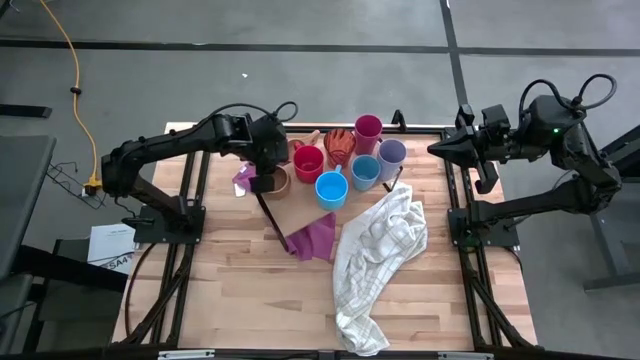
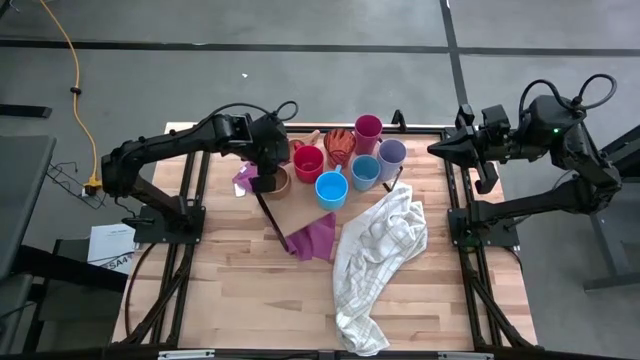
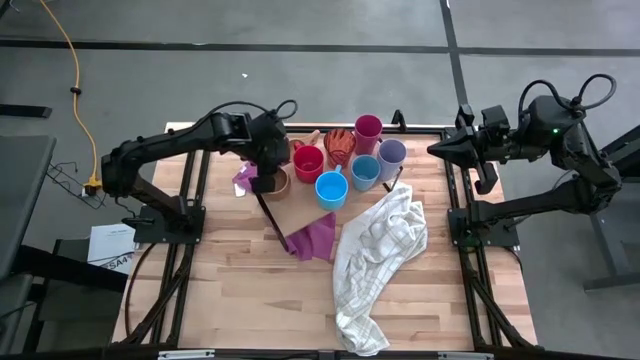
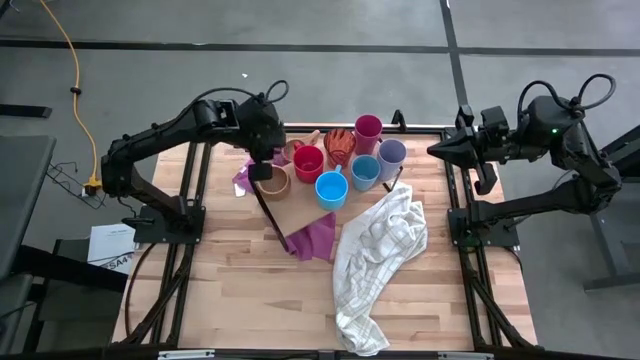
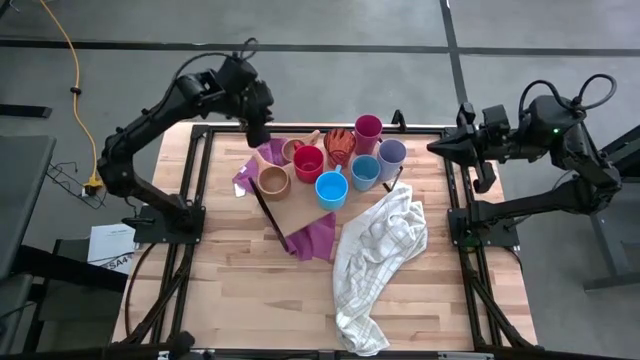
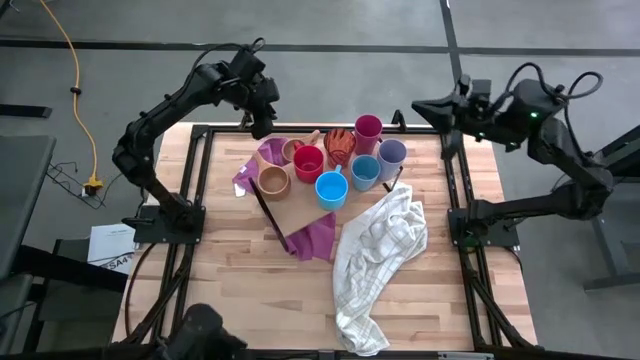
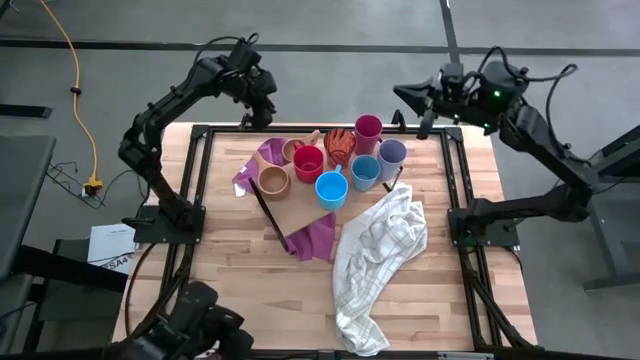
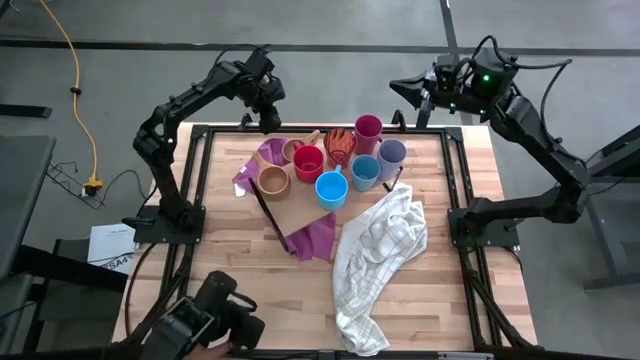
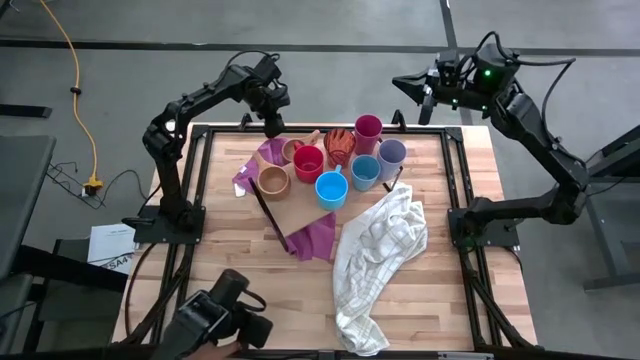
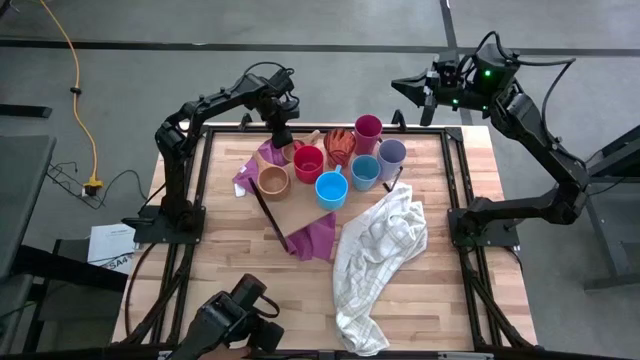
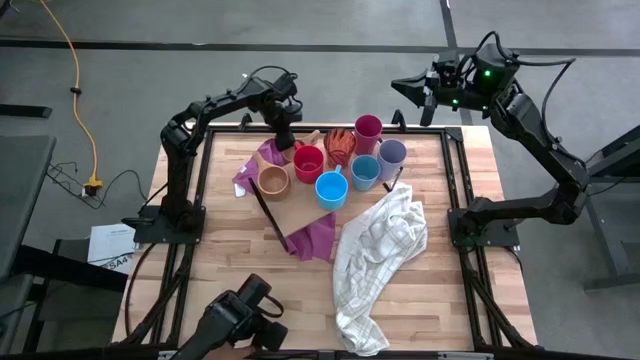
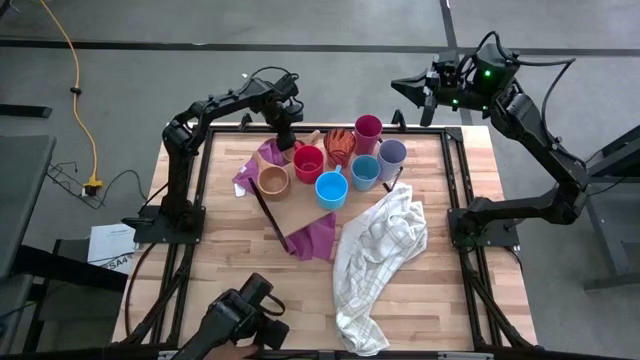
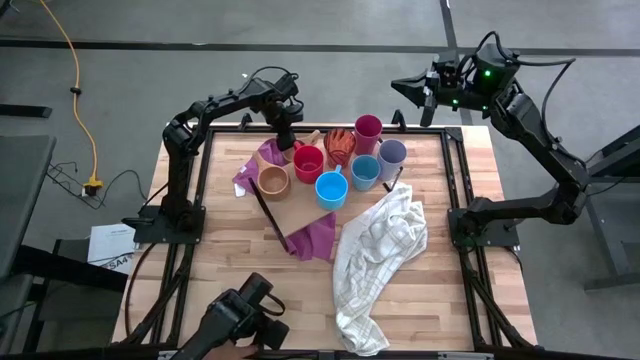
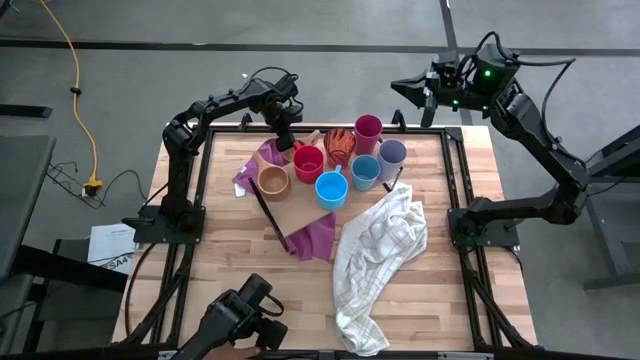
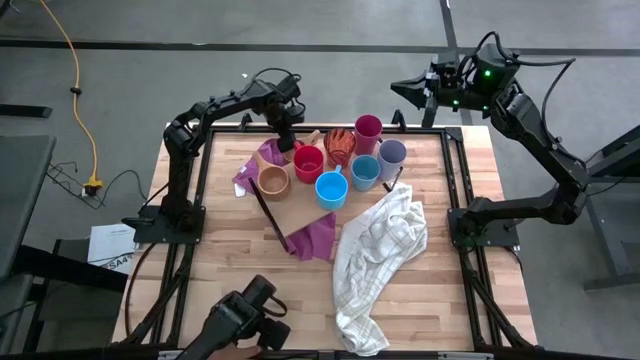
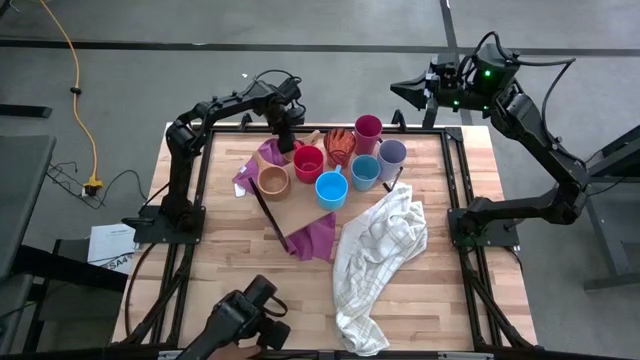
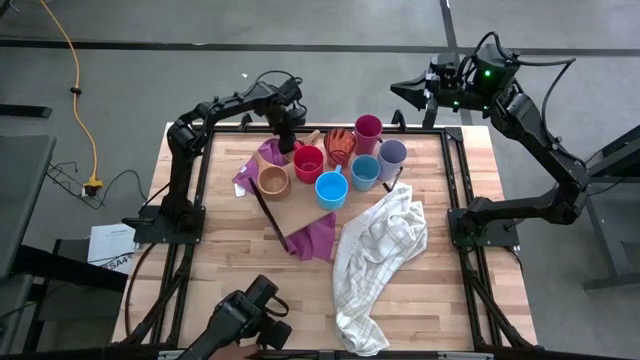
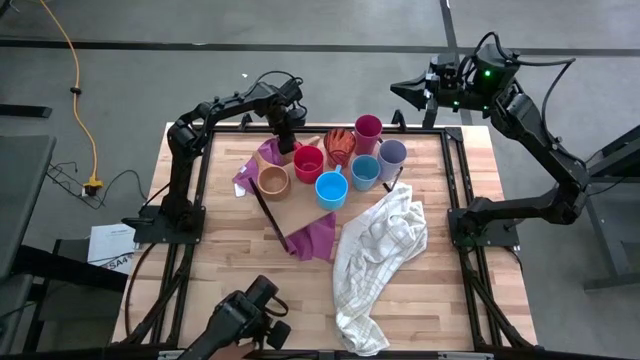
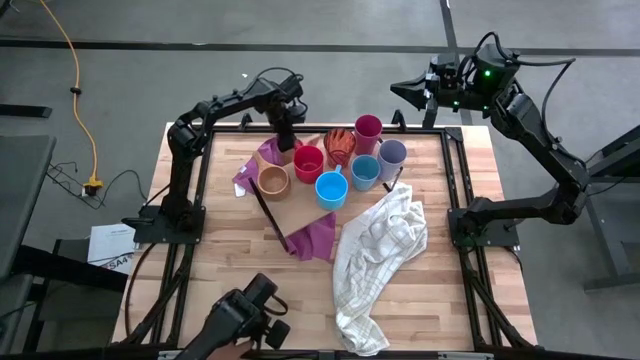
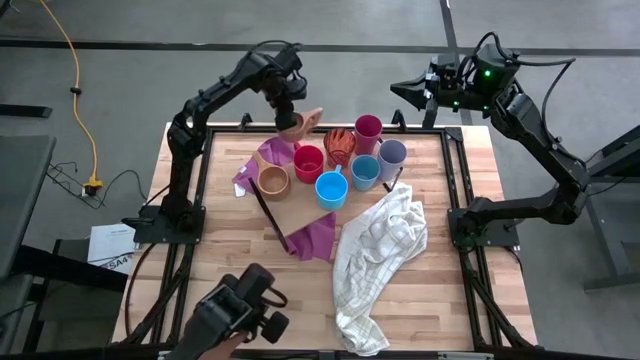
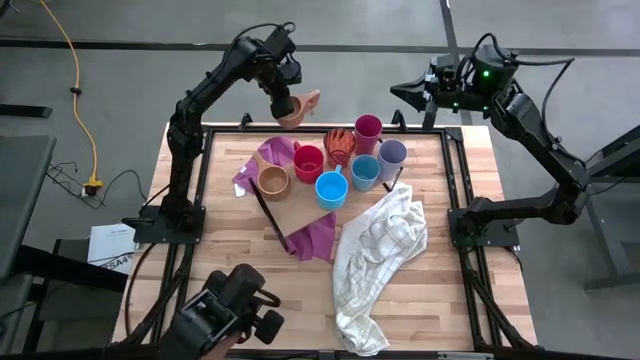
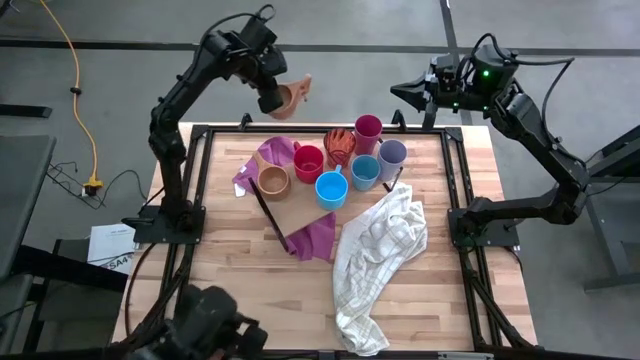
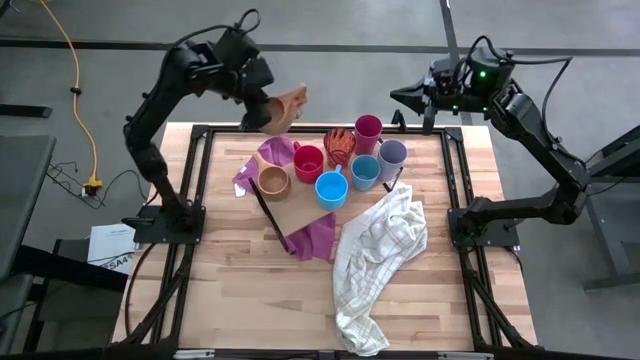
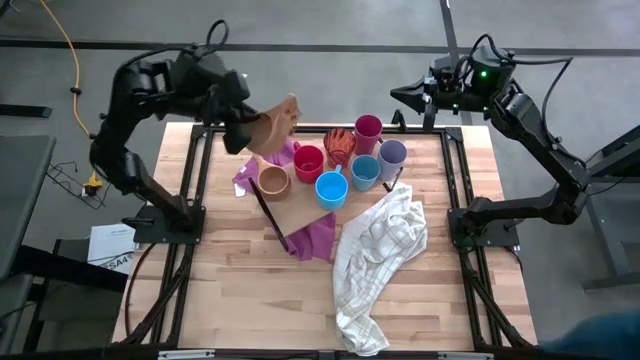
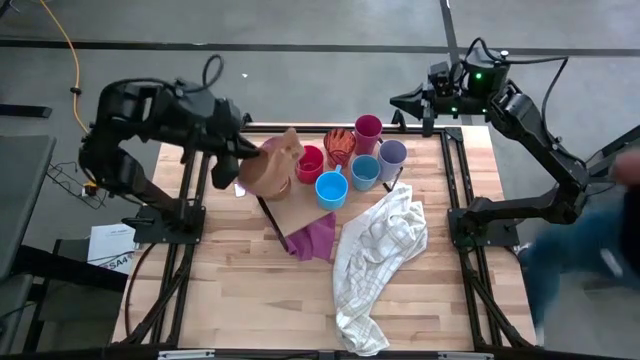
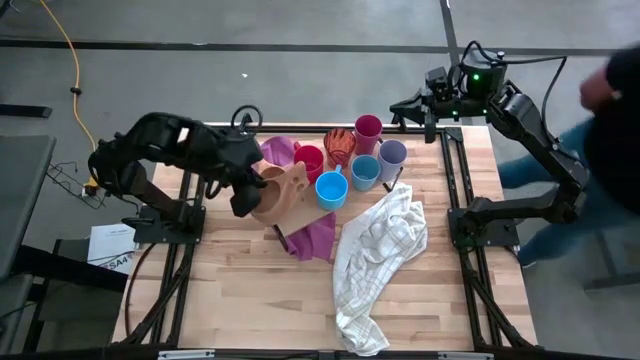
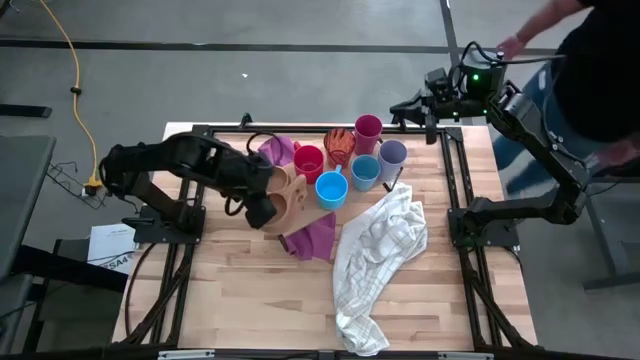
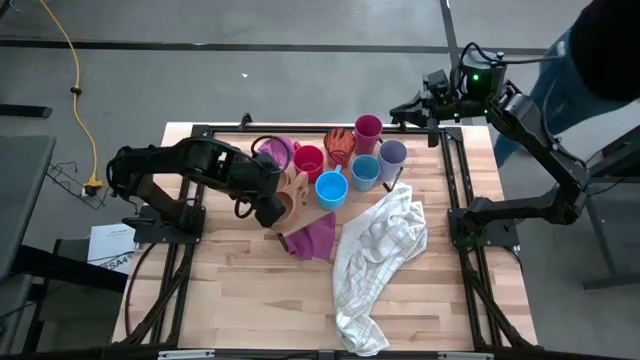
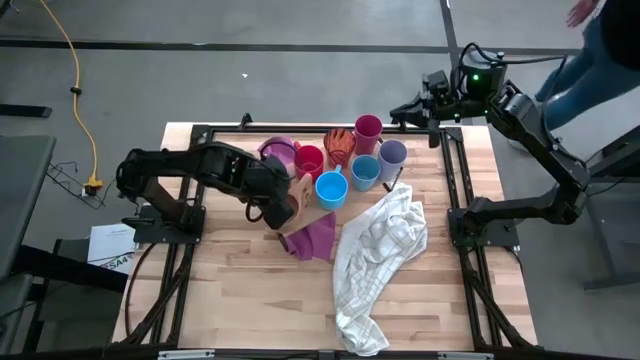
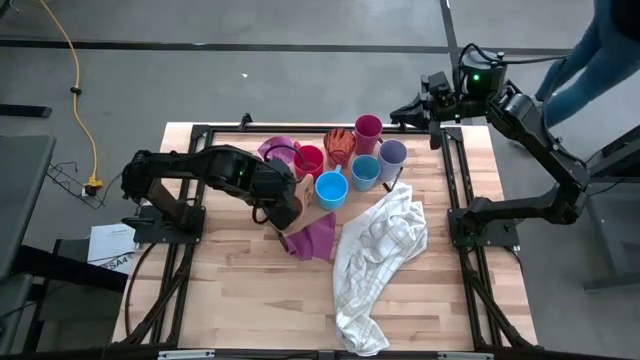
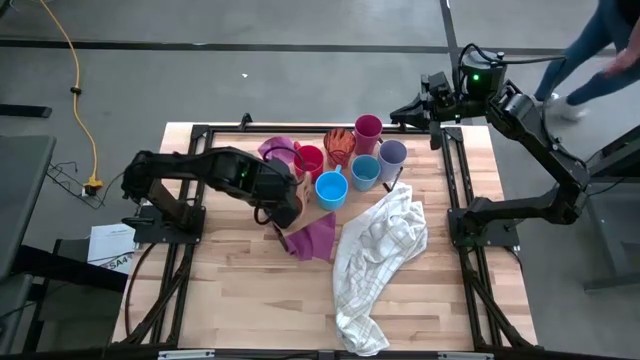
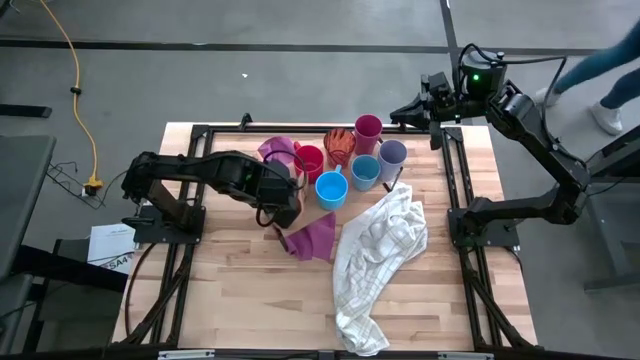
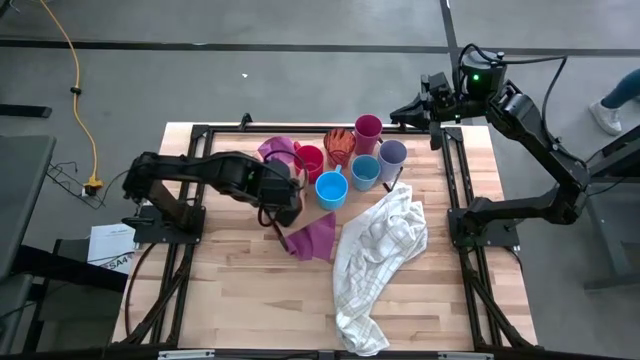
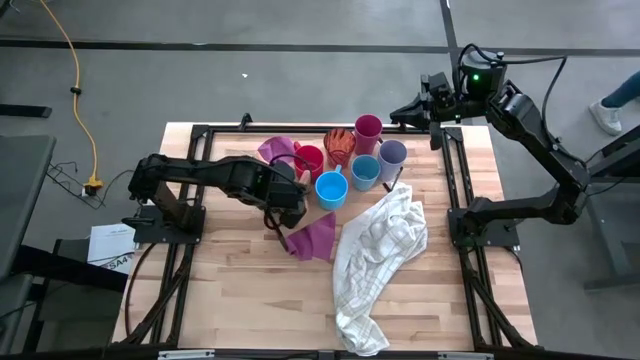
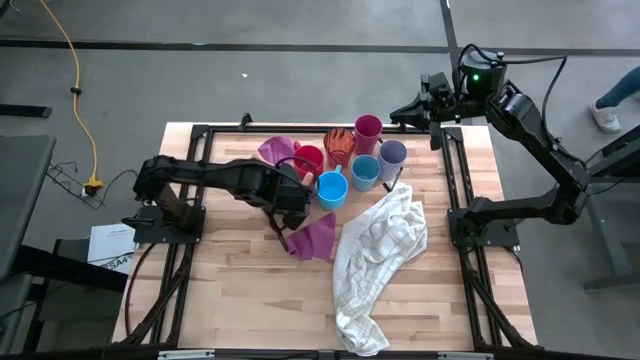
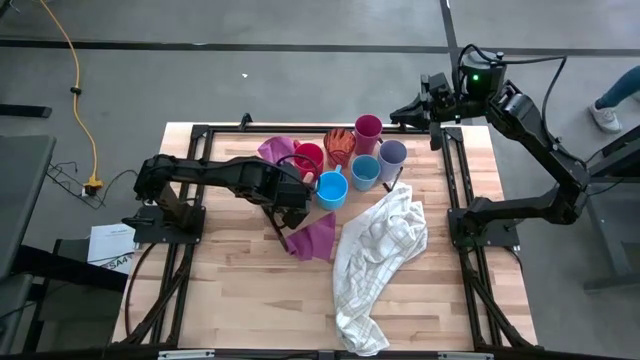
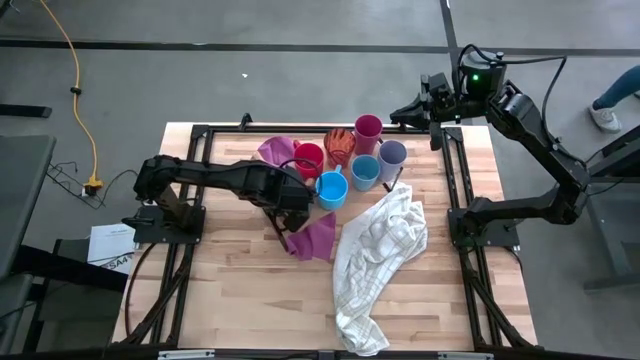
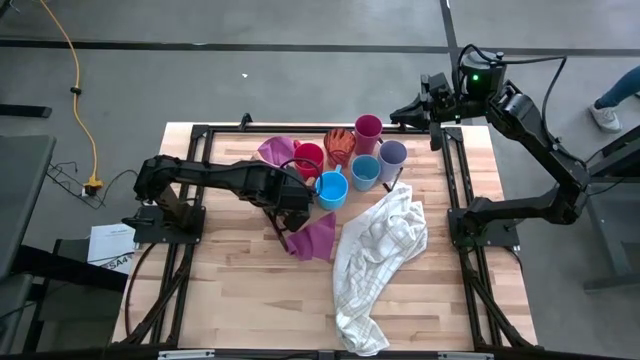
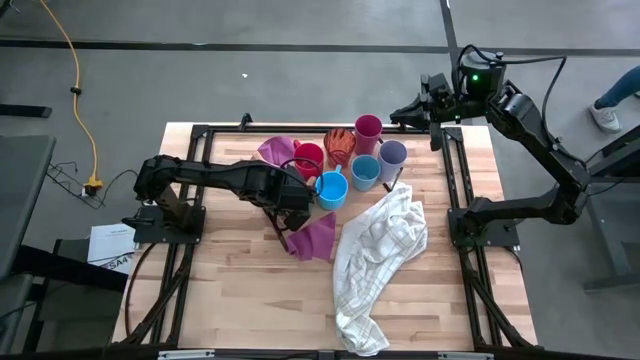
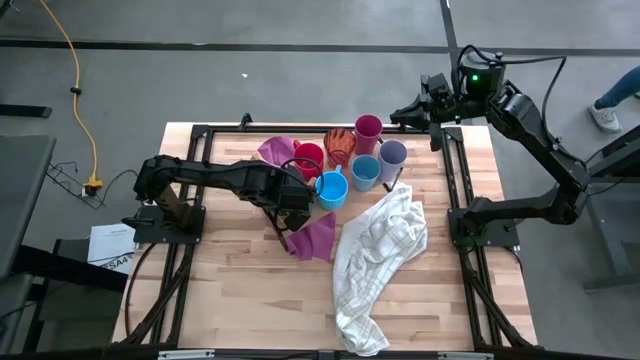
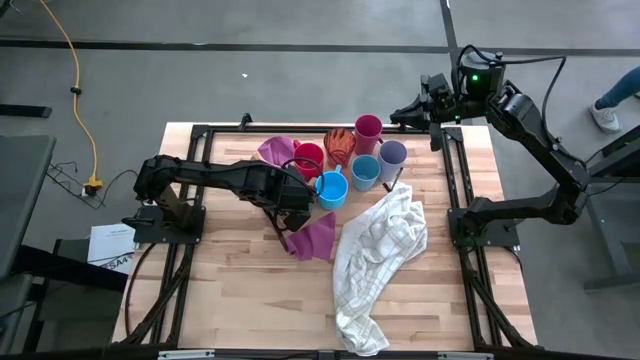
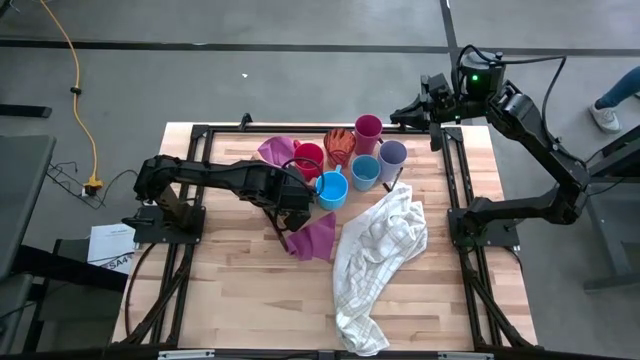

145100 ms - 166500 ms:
Task: Stack small to large cups/mugs on shelf
Put the brown mug on the shelf
